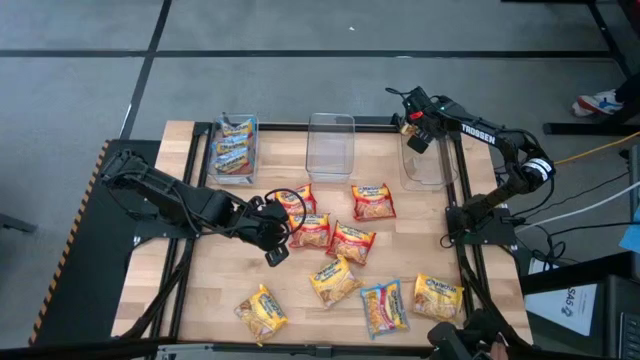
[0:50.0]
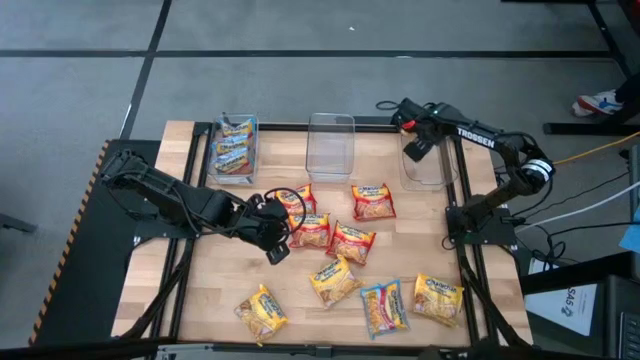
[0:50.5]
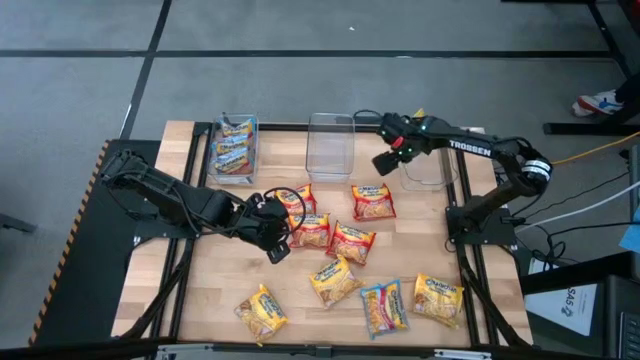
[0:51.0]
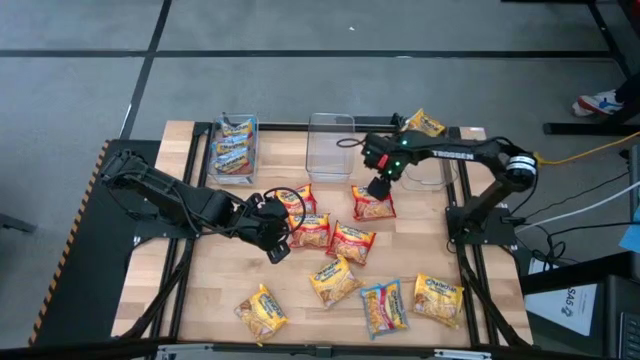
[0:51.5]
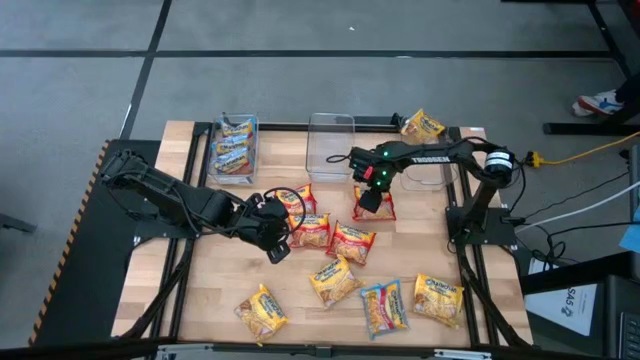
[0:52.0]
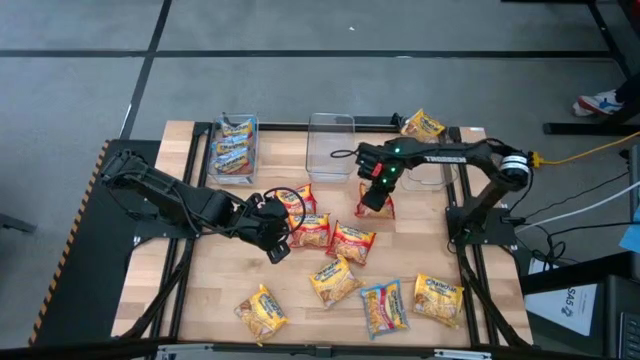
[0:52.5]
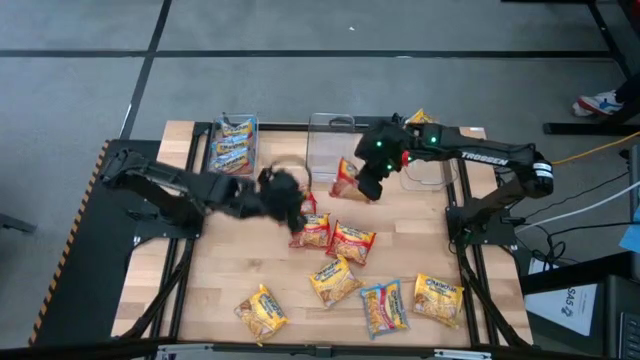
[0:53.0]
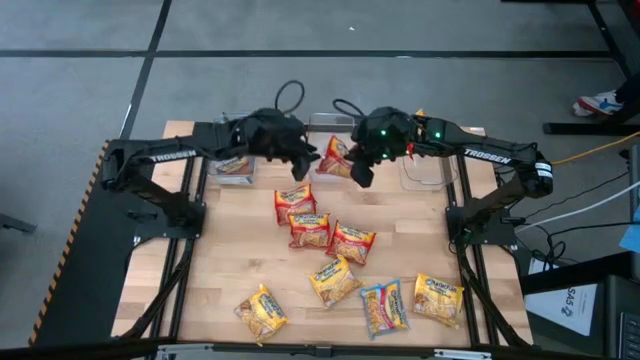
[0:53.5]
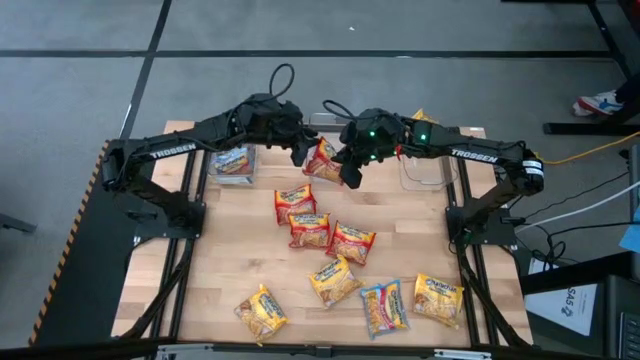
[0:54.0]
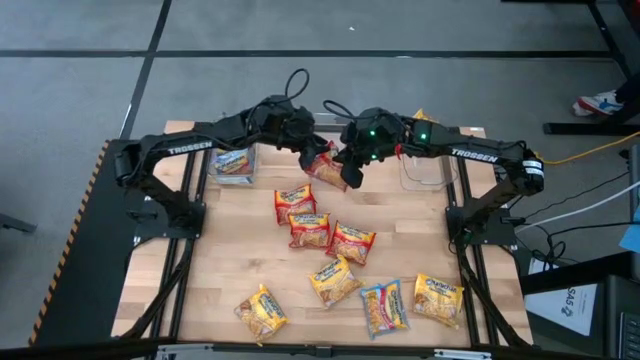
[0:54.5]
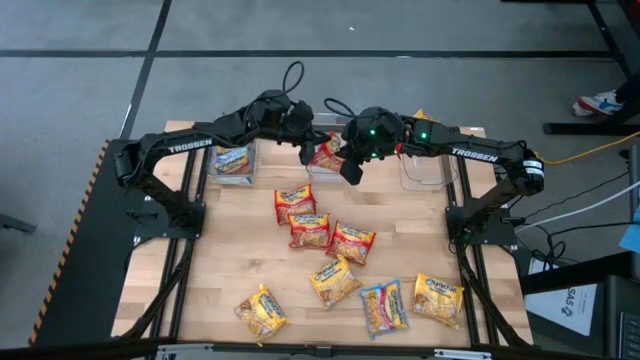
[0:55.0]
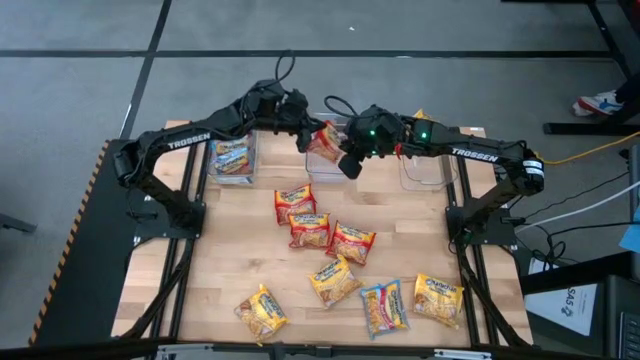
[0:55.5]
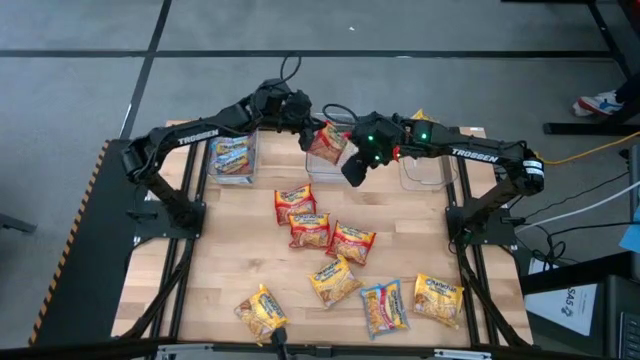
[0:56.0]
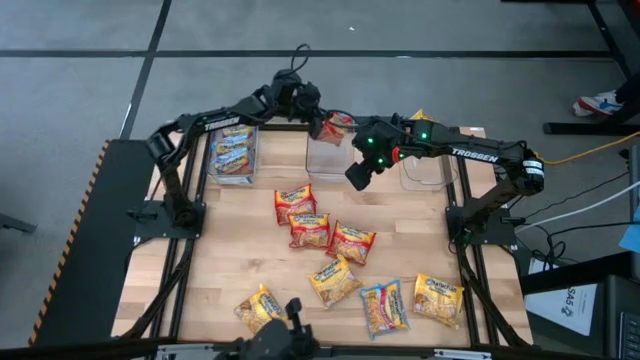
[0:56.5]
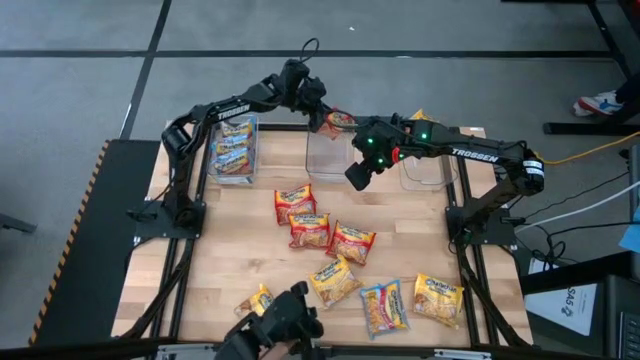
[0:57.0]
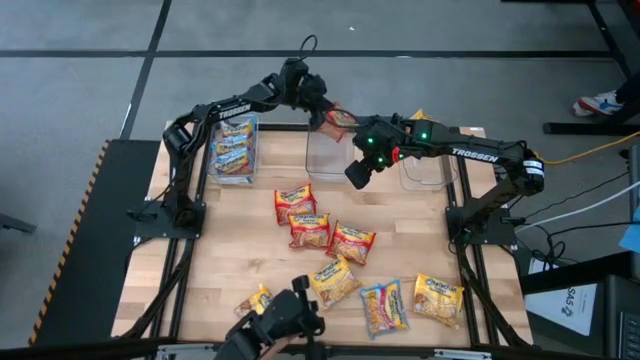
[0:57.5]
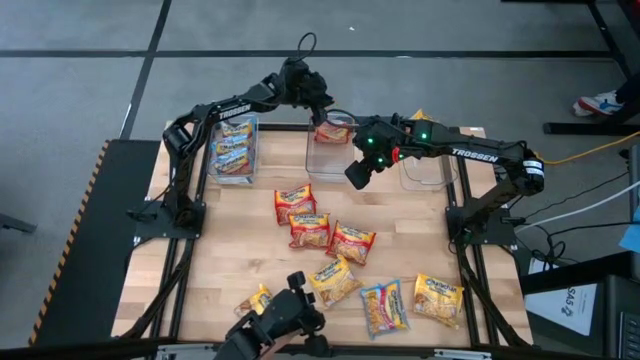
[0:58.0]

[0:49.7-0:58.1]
Task: Sort Maruchan noodles
Put the red noodle pack in the middle transparent basket

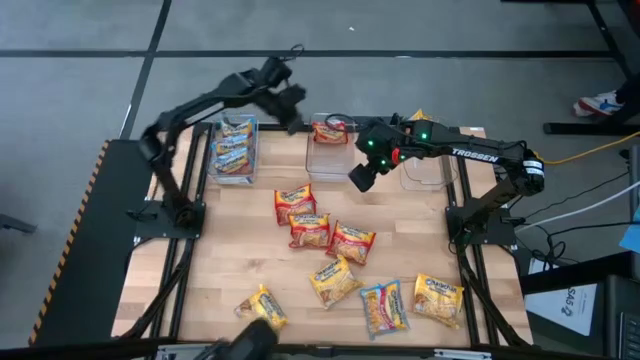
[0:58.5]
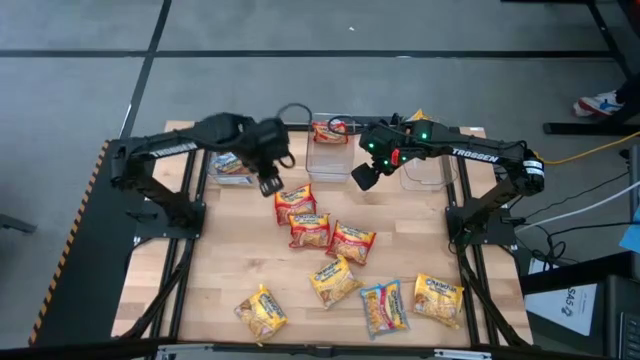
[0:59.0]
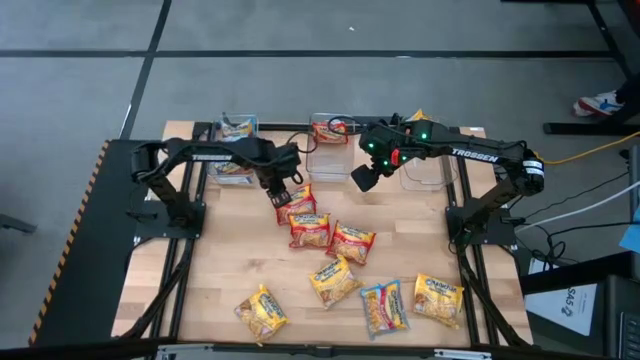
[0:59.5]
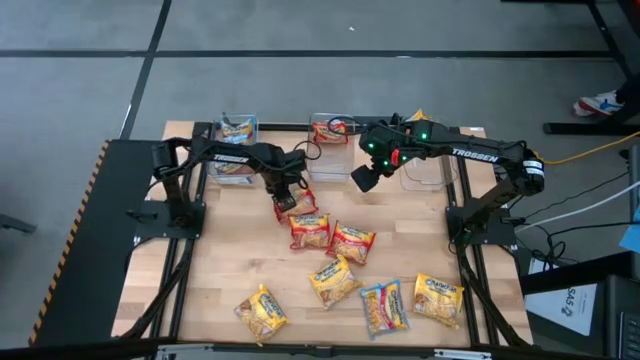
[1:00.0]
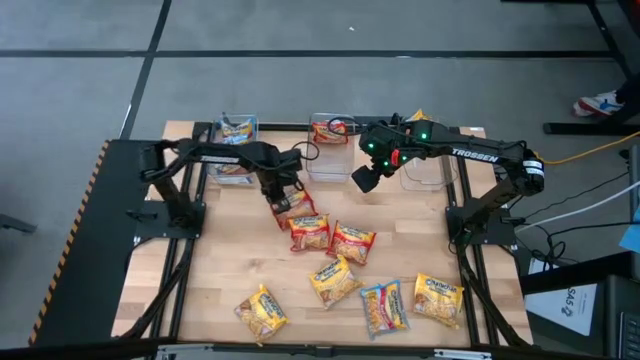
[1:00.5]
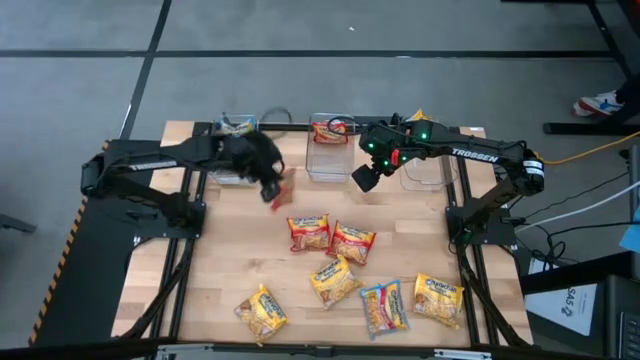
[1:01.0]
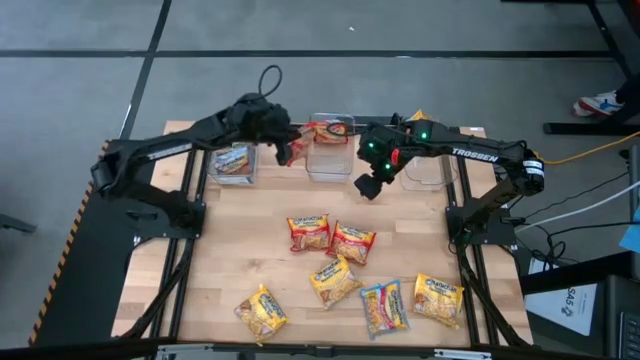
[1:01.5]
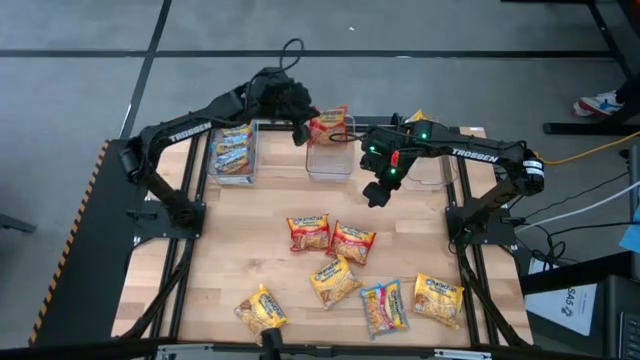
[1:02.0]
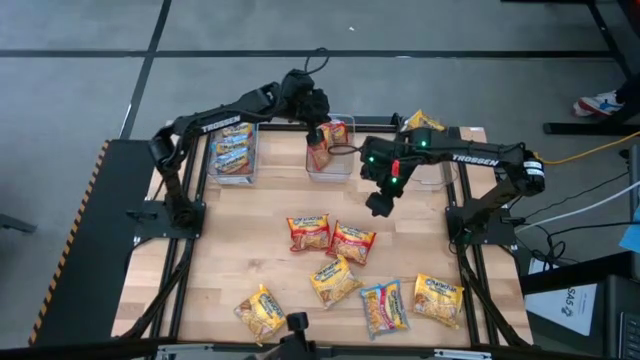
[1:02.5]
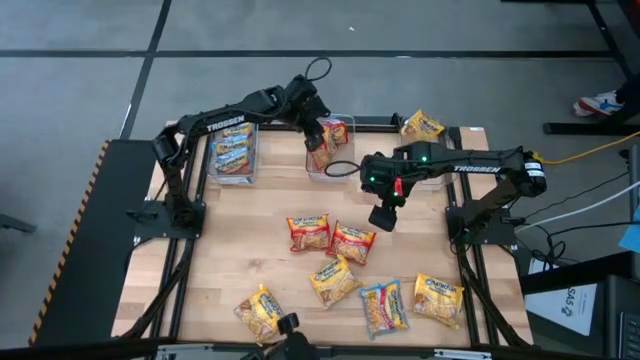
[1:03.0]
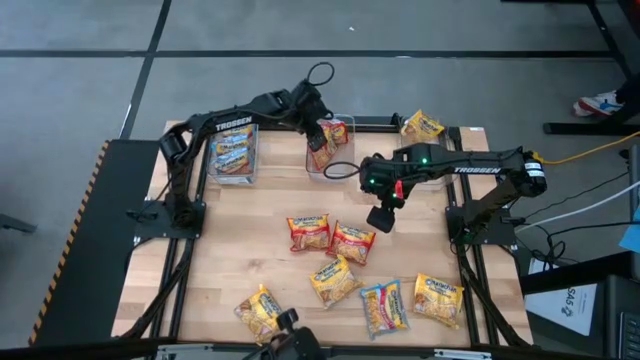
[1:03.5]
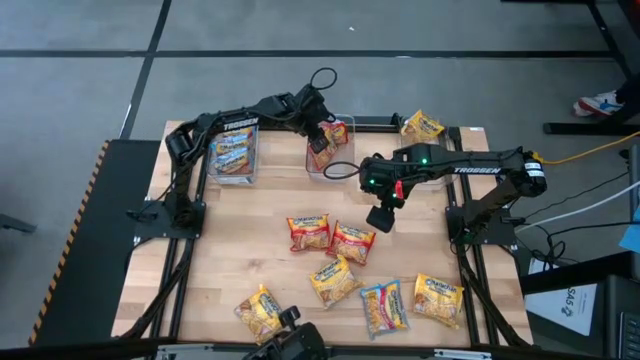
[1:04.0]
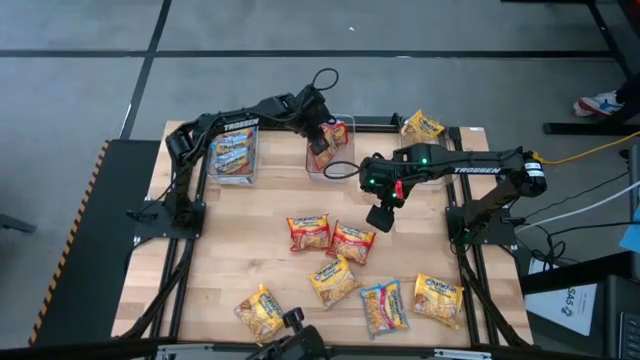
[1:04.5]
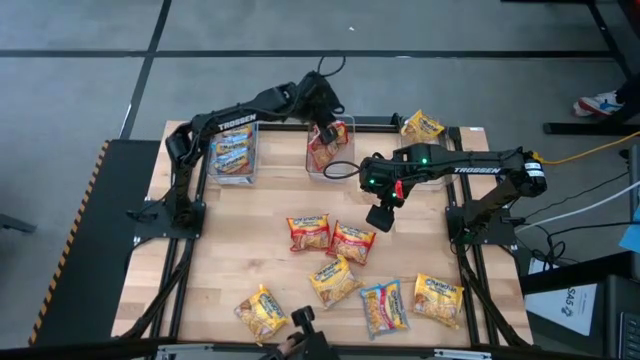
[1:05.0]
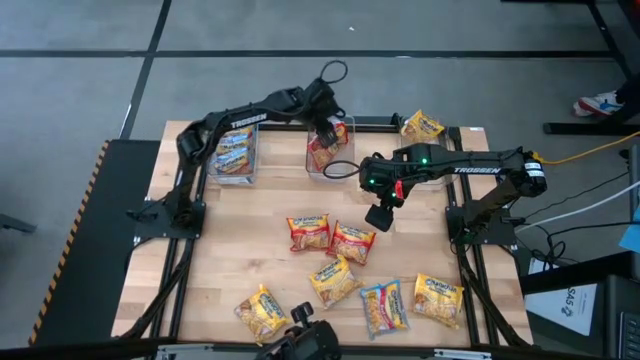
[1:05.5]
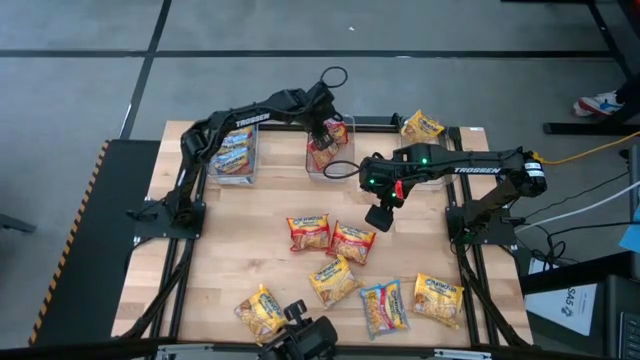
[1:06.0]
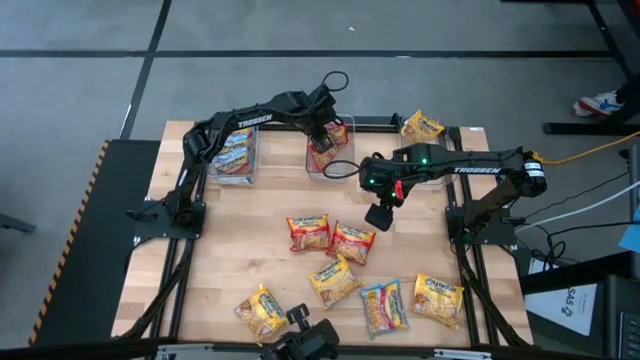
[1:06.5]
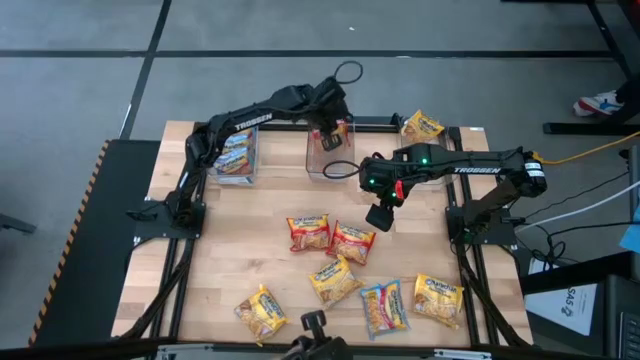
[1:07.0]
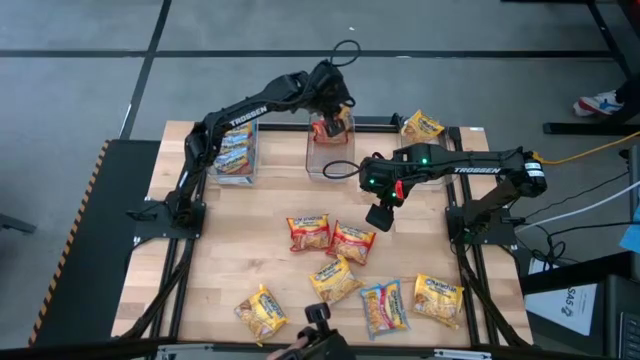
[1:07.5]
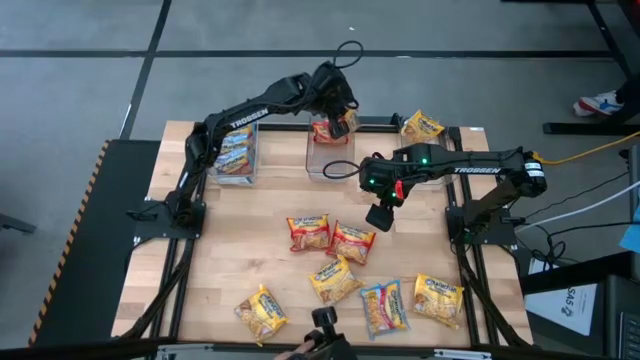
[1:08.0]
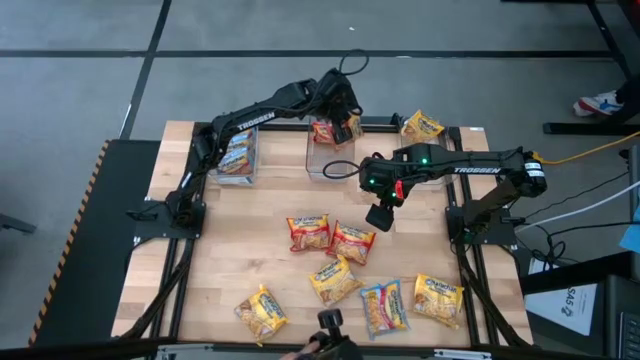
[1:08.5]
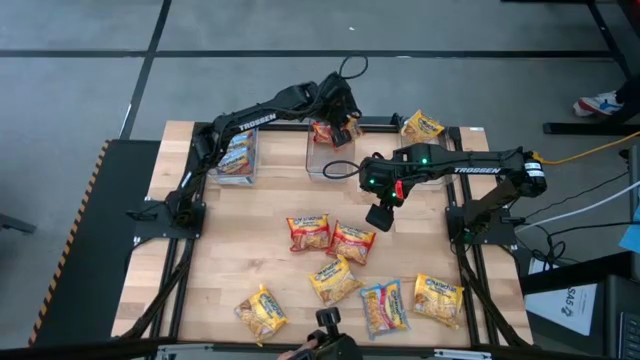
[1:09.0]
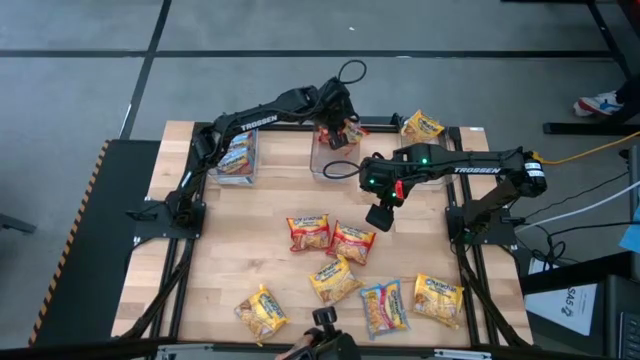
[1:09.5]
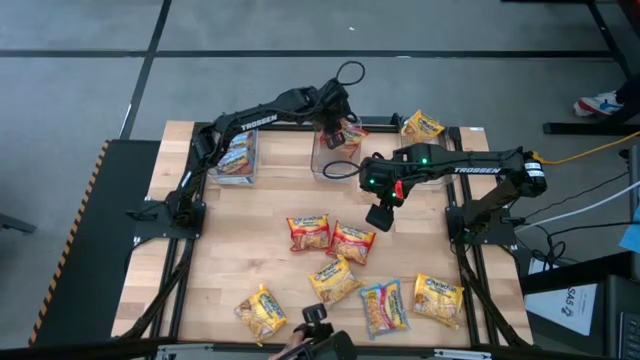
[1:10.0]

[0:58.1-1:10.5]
Put the red noodle pack in the middle transparent basket
